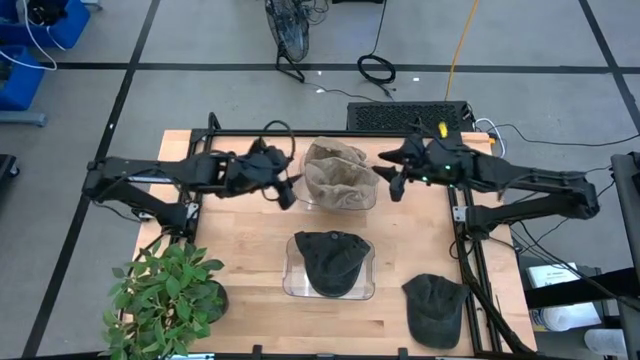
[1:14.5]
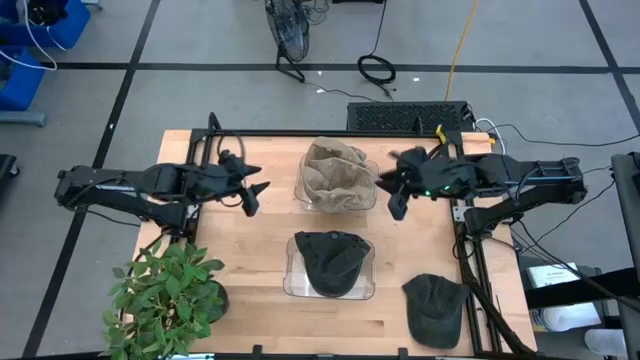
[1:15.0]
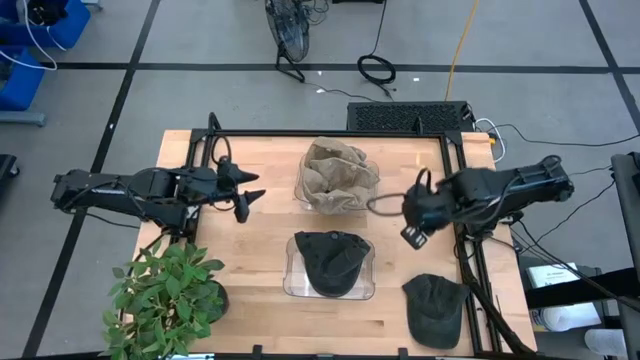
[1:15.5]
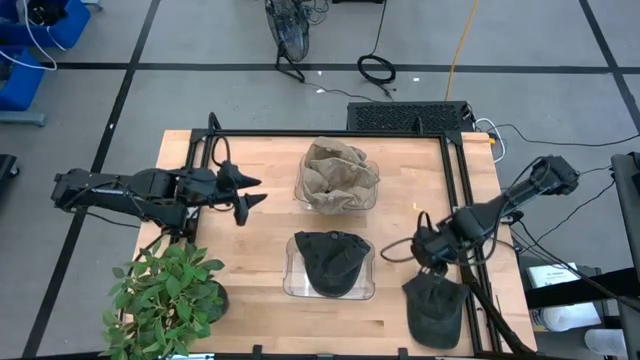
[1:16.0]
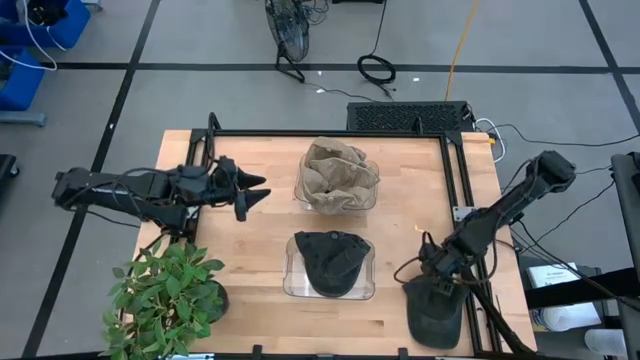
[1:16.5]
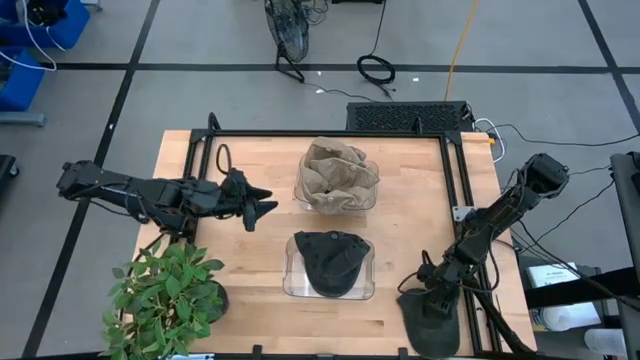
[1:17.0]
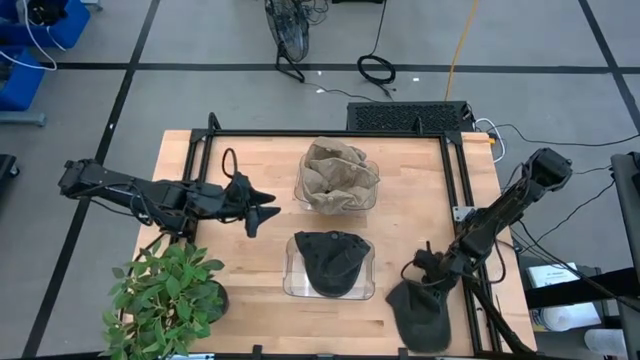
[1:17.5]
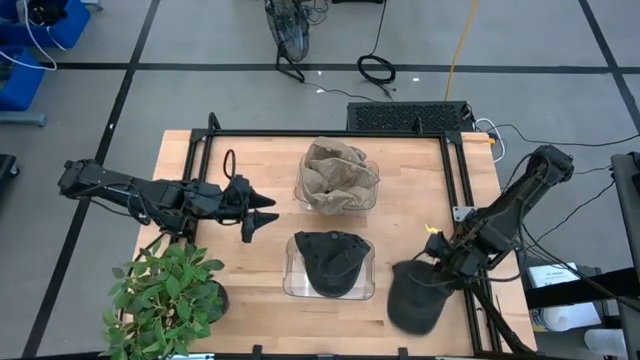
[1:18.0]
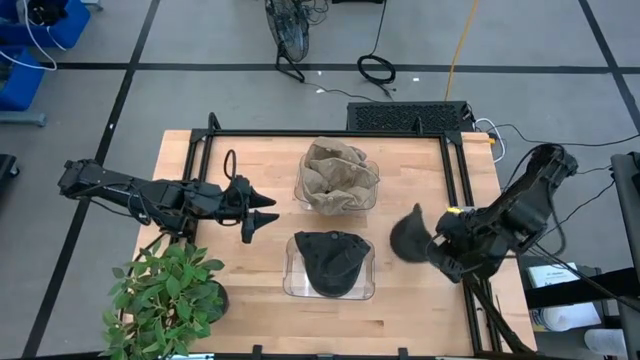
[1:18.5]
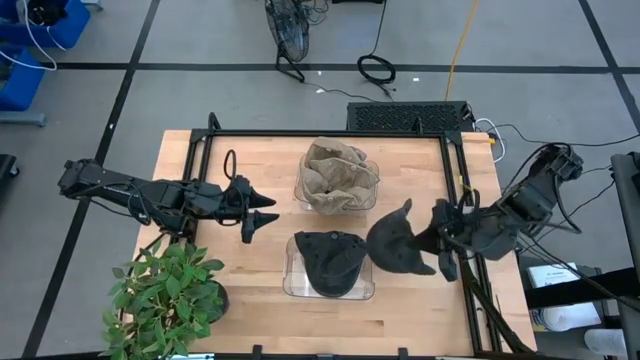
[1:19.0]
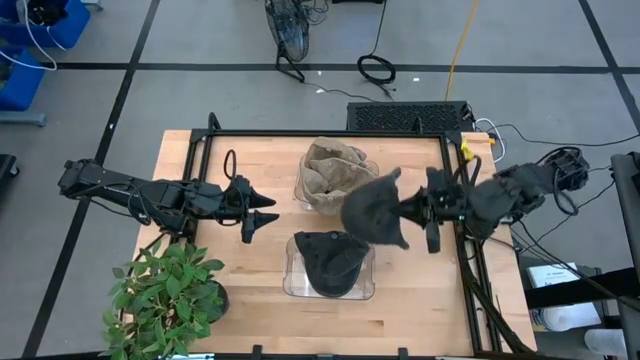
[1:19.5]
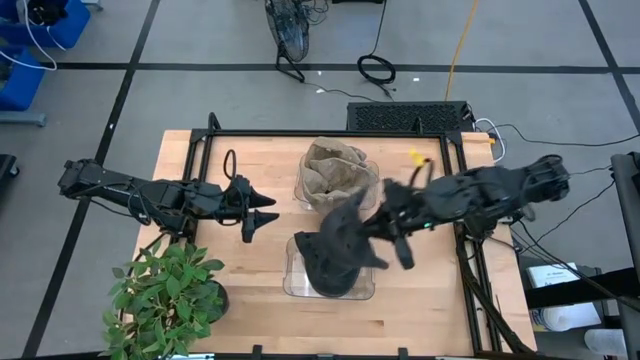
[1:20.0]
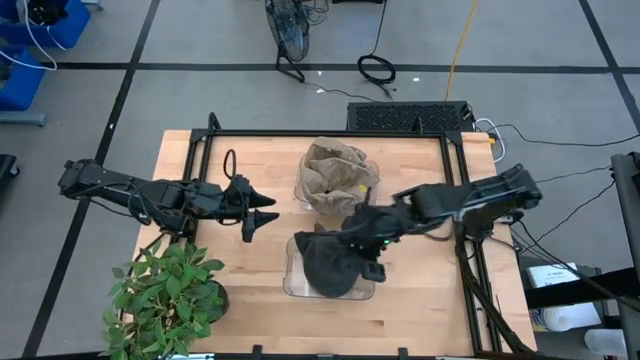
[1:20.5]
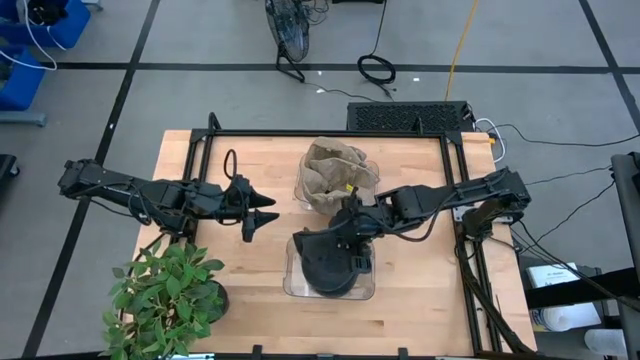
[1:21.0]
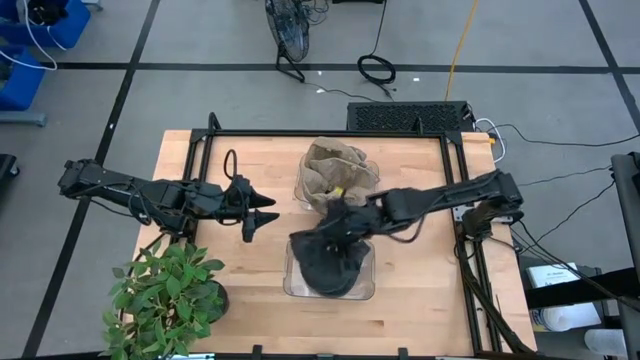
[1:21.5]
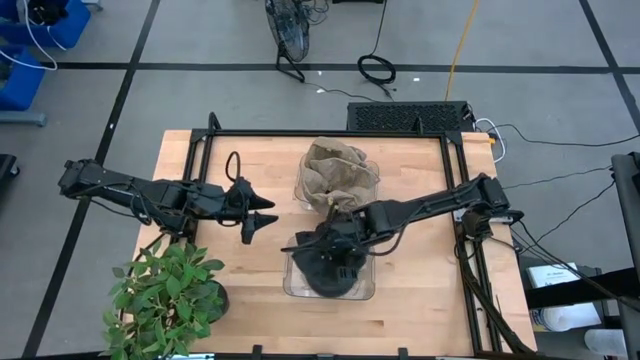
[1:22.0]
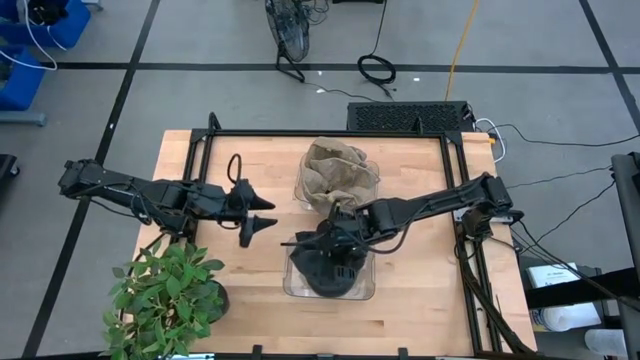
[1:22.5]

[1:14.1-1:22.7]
Task: Pick & Place hat
Put the black cap into the bottom transparent bin

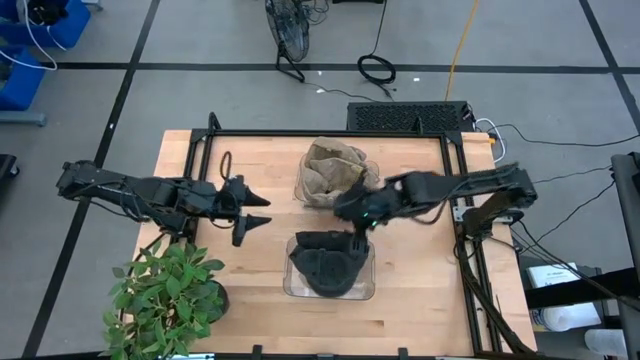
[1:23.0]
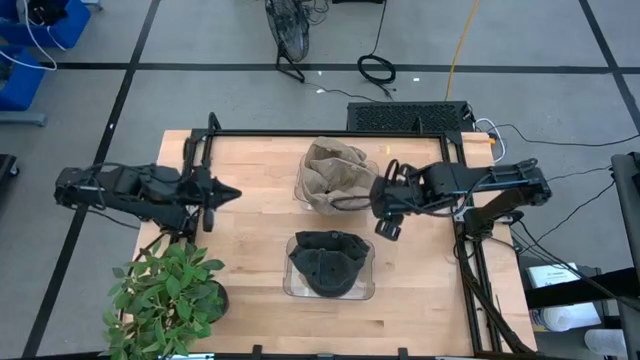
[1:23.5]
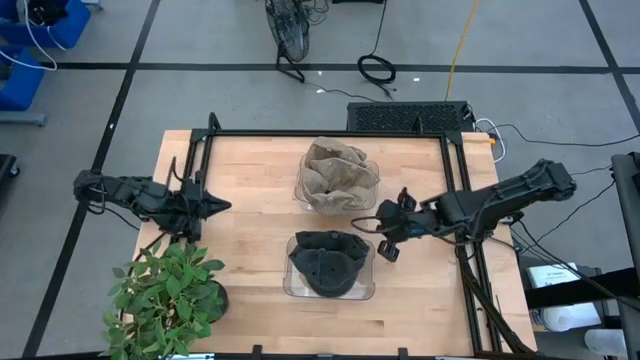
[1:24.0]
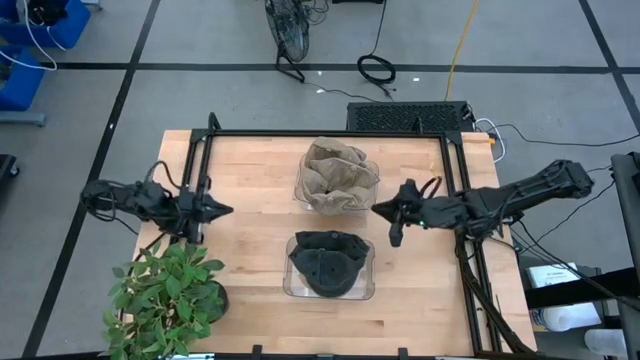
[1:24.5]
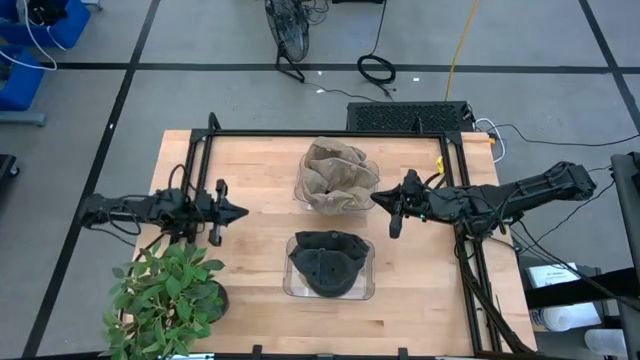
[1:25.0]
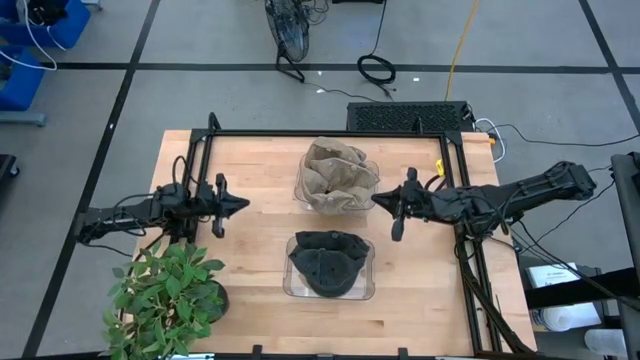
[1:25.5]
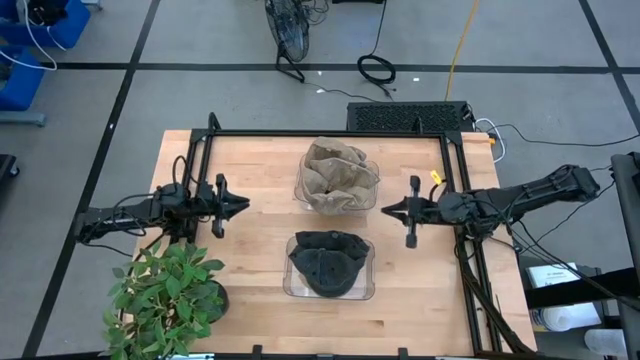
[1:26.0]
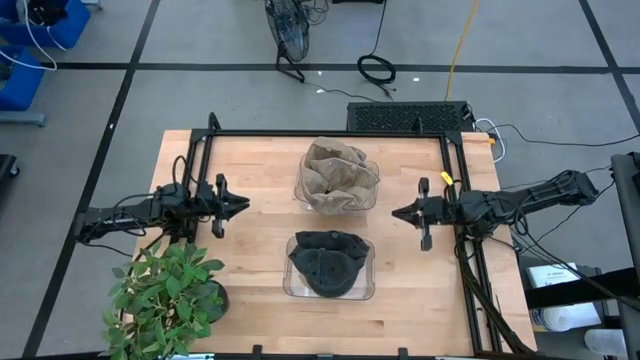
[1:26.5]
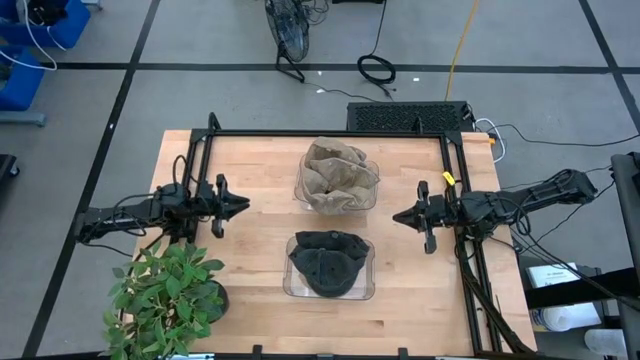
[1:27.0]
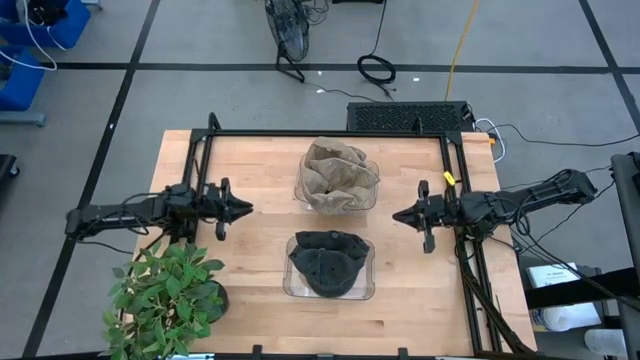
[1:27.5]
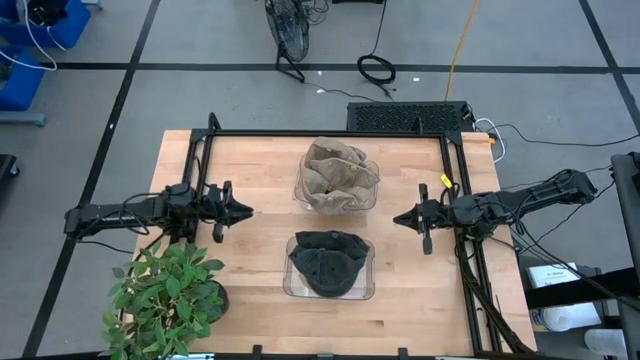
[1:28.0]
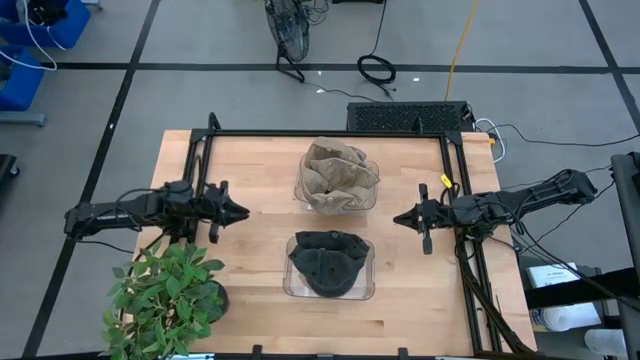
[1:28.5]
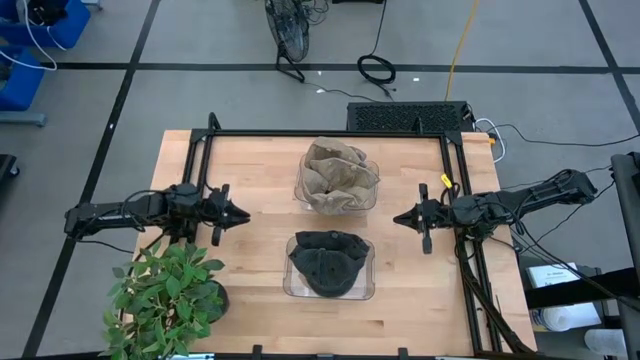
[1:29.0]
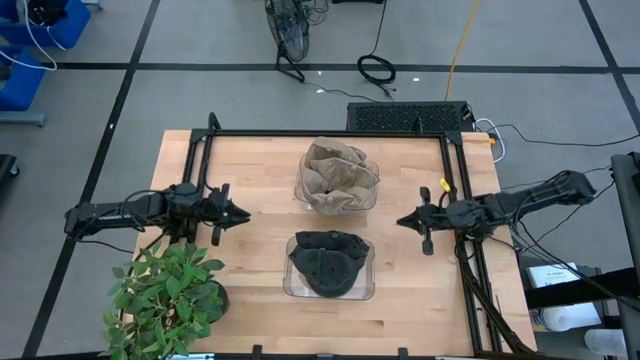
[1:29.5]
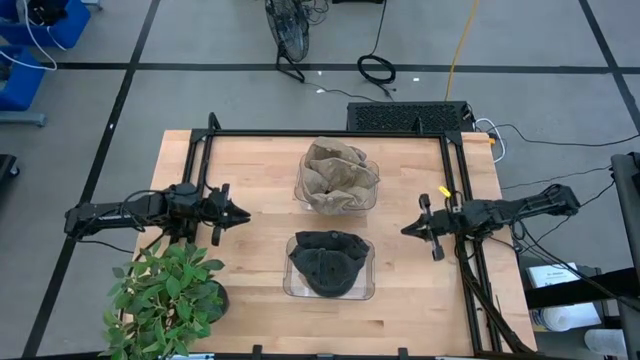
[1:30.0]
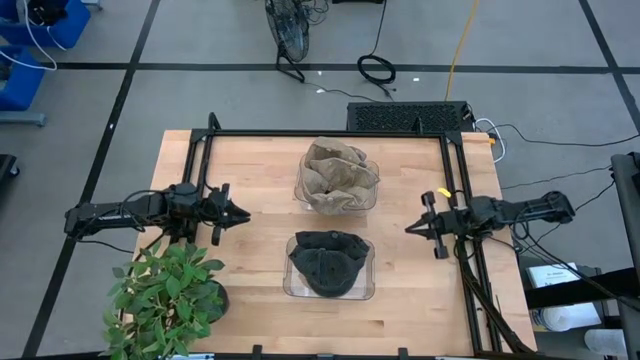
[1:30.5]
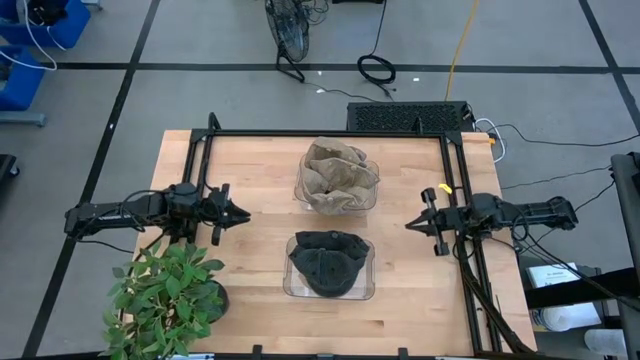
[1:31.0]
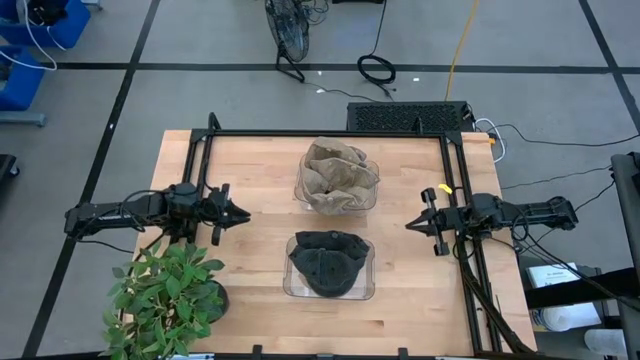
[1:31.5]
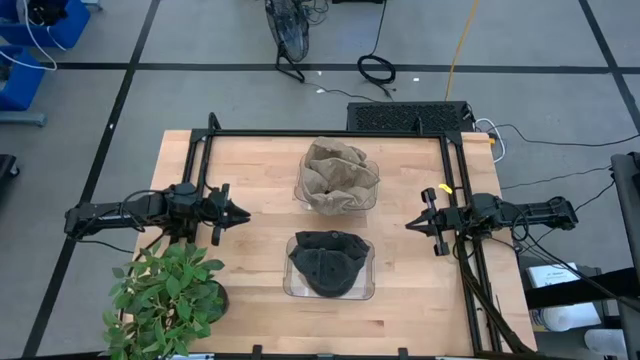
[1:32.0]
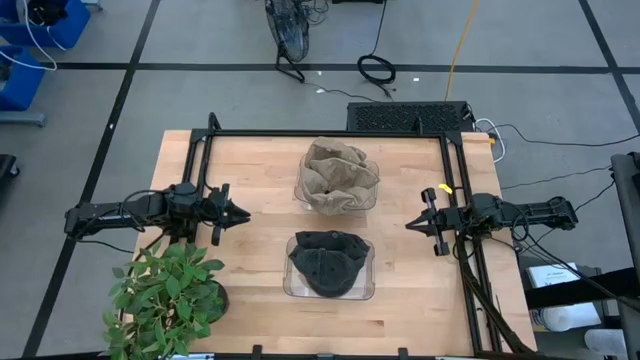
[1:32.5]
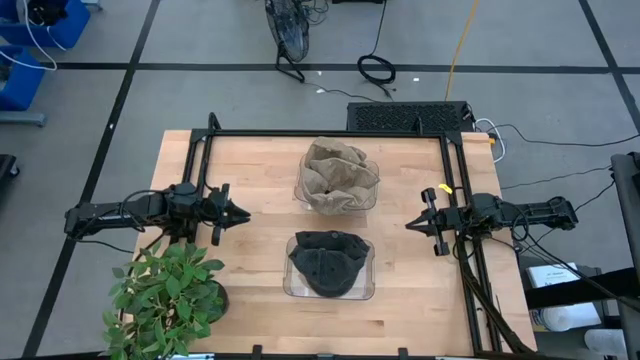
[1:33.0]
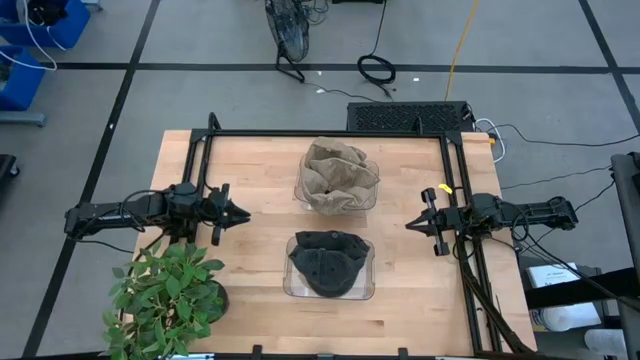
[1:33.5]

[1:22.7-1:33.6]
Return to Home Position

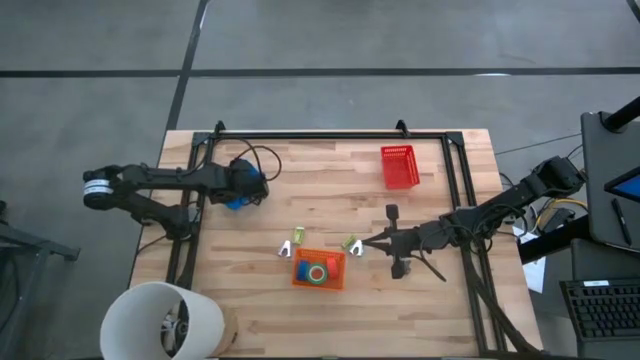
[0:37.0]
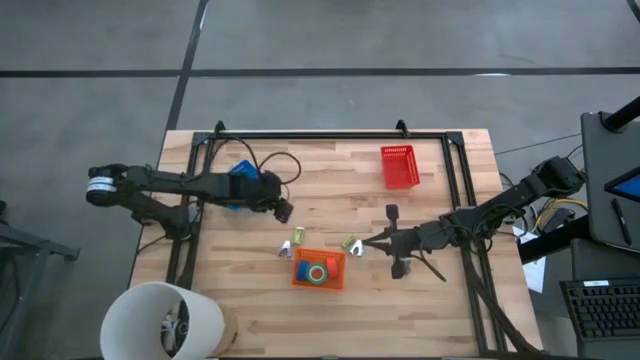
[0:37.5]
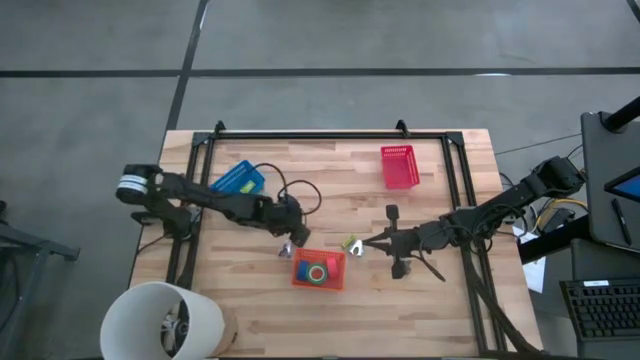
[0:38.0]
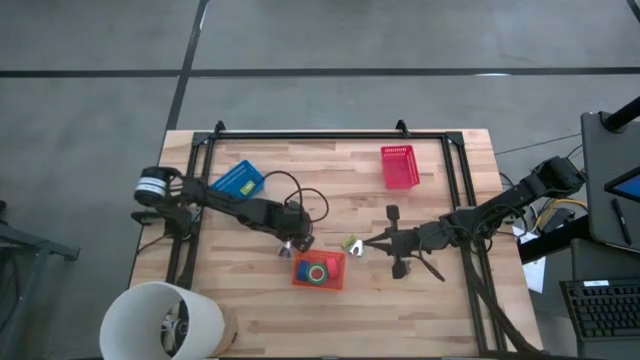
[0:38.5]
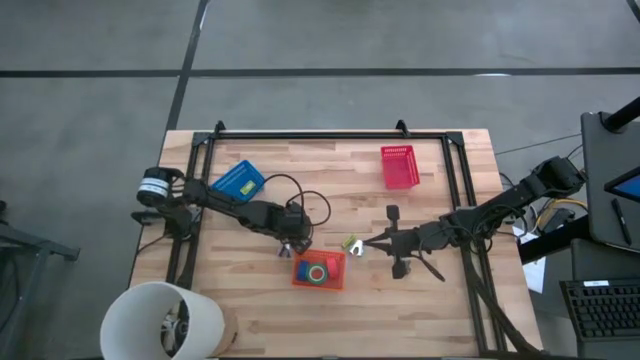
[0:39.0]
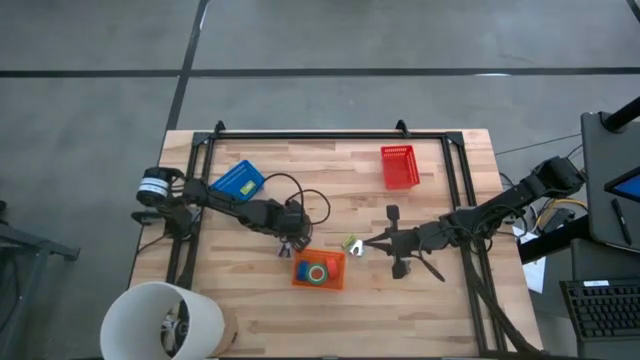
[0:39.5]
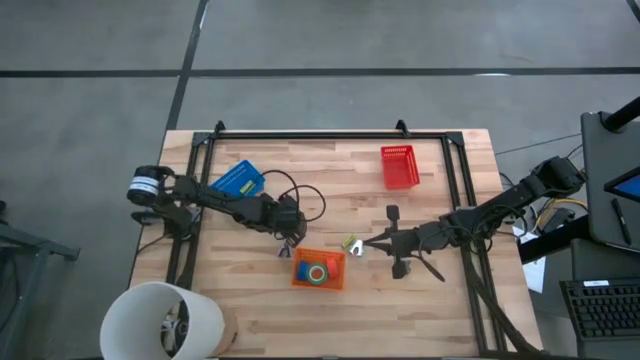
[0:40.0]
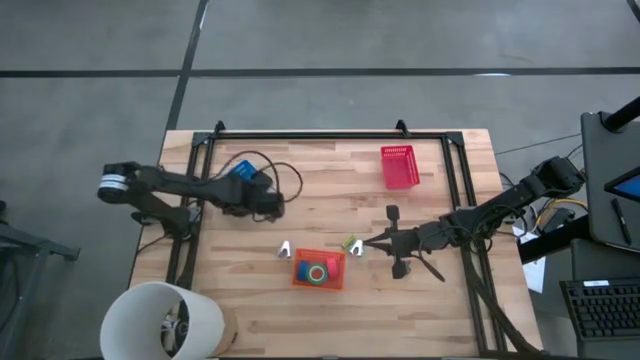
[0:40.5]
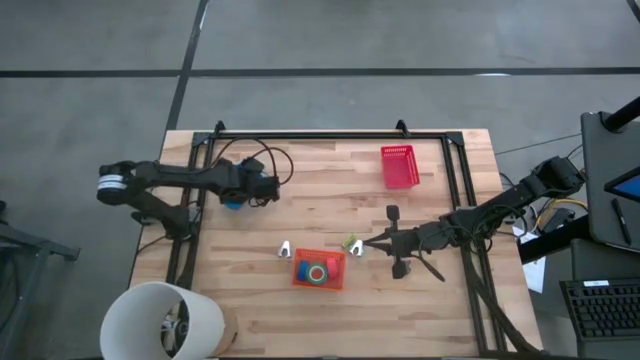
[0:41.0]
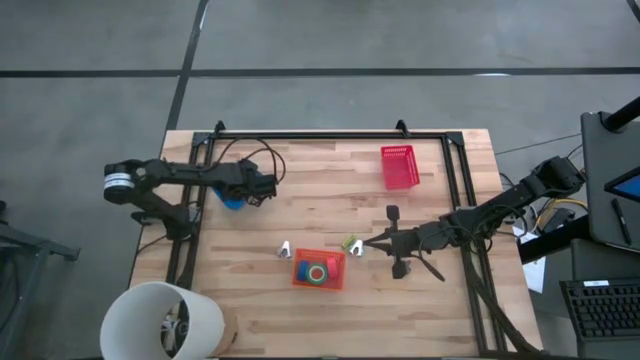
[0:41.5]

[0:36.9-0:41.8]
Task: Pick and place Stapler, Stapler remover, tape
Put the green staple box into the blue bin
